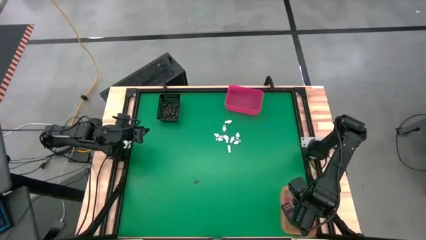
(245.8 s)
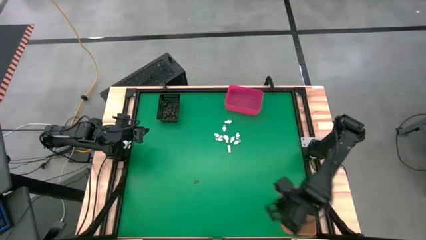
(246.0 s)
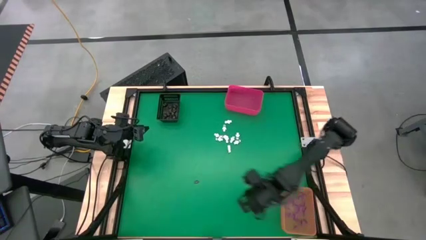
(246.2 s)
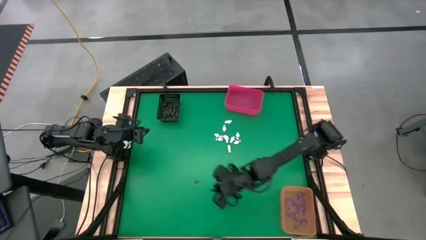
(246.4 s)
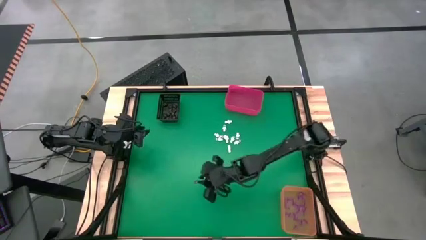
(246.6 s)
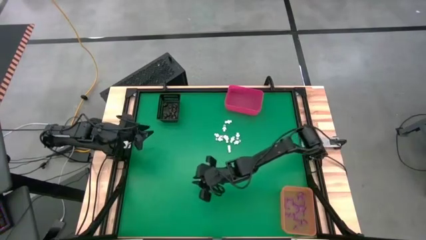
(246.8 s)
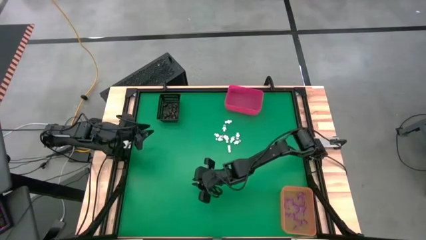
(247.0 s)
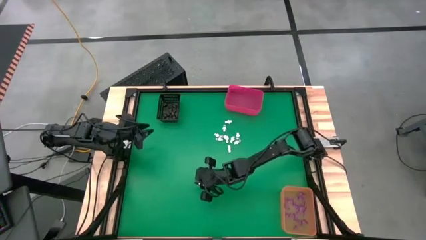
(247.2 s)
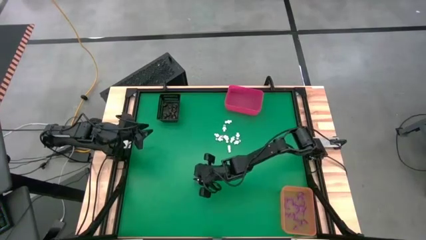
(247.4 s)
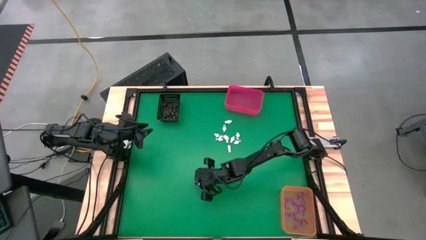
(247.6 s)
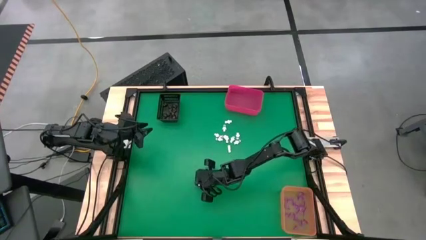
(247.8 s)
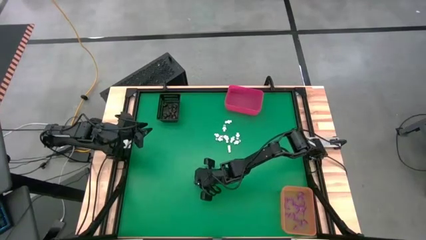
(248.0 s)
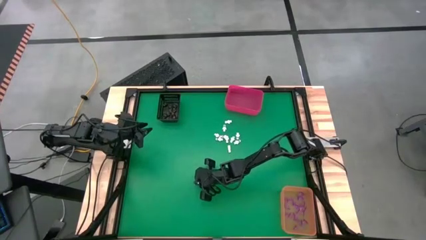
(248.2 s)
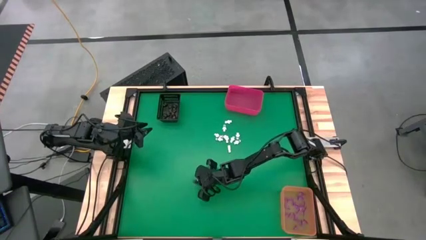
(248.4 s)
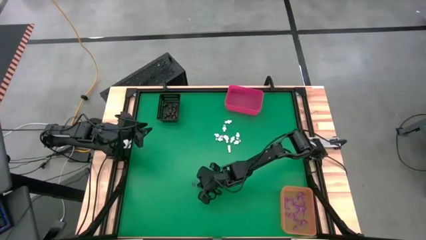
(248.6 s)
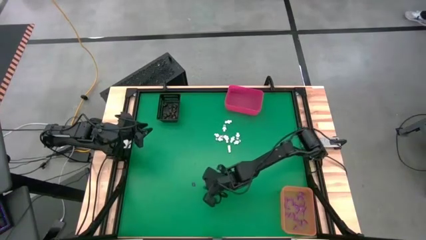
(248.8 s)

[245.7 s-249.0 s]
Task: Sort Halloween decoration
Put the pink witch hat toy into the orange bin

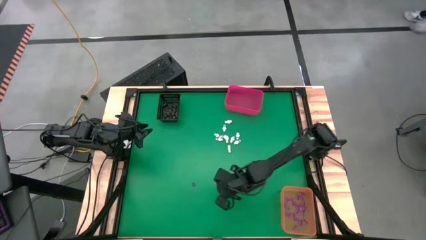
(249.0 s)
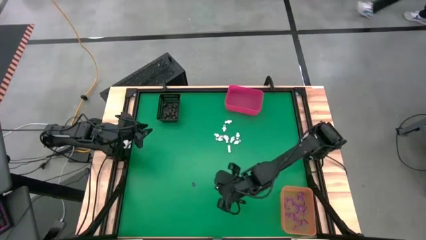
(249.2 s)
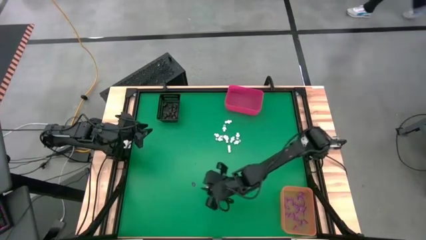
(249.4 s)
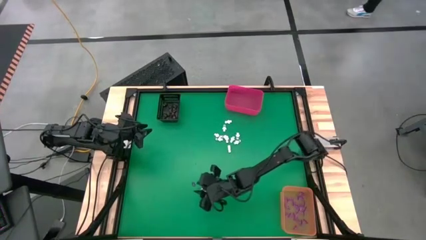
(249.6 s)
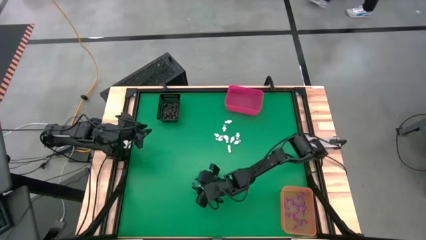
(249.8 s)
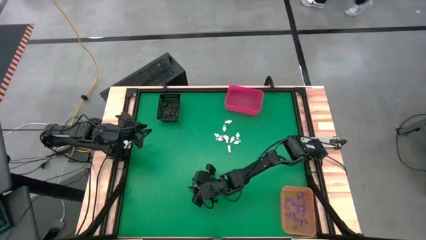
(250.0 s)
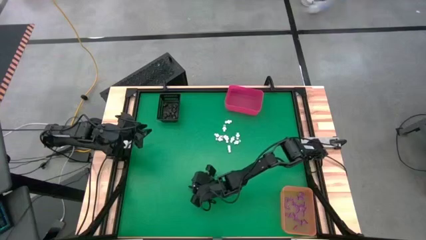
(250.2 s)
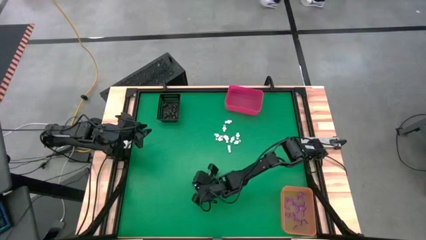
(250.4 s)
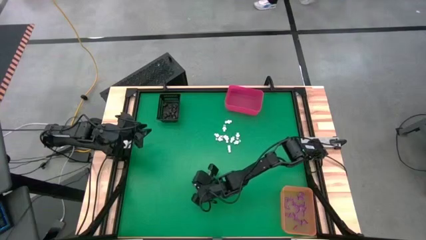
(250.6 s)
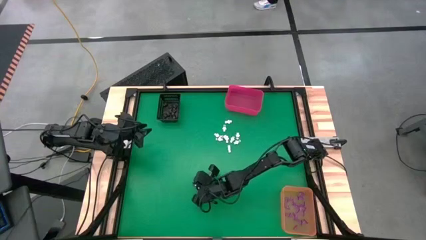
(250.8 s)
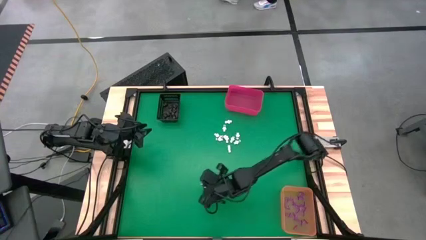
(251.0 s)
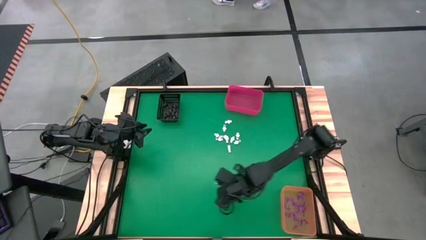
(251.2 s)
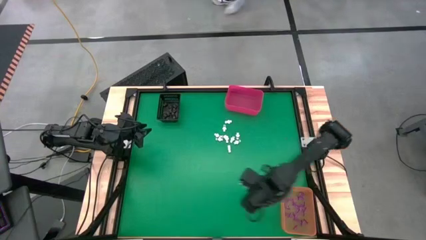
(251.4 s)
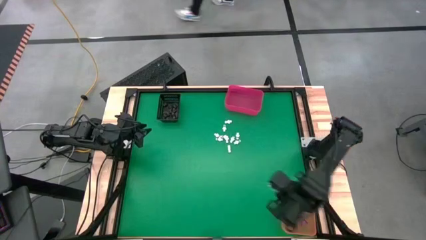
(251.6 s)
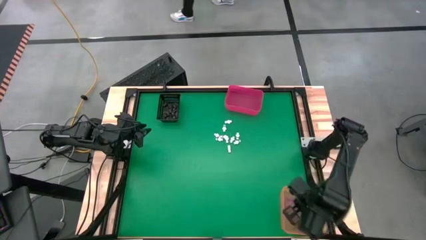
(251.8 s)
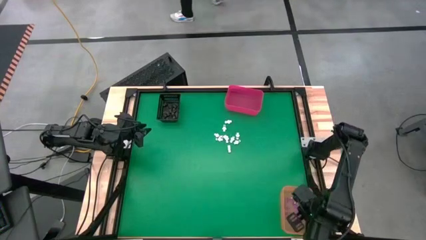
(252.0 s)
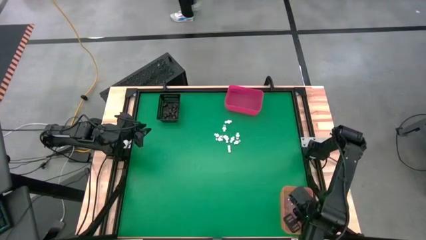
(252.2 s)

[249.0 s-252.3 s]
Put the pink witch hat toy into the orange bin

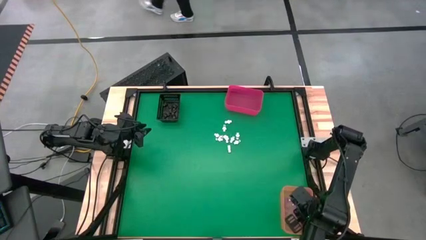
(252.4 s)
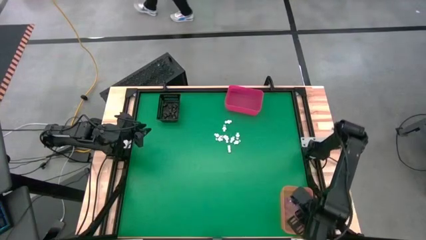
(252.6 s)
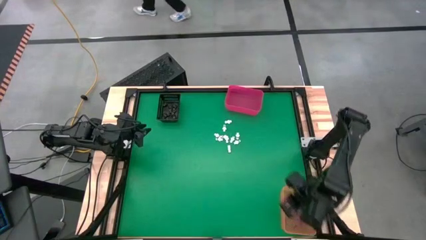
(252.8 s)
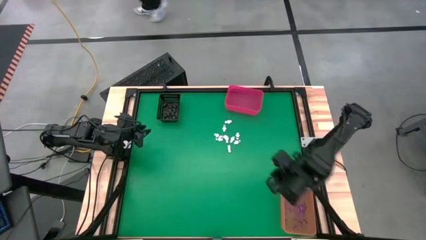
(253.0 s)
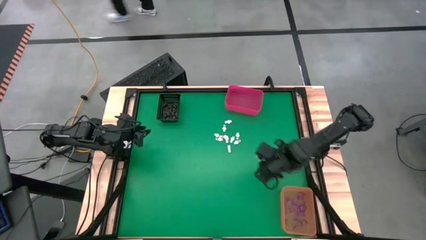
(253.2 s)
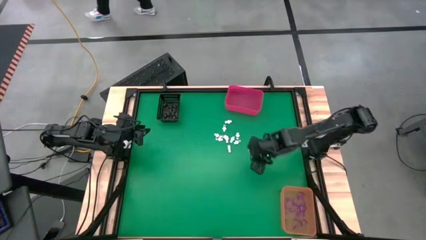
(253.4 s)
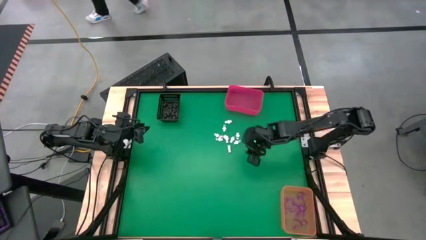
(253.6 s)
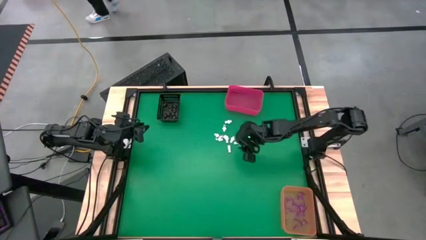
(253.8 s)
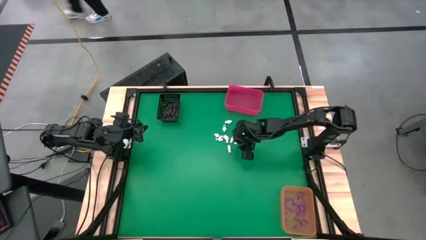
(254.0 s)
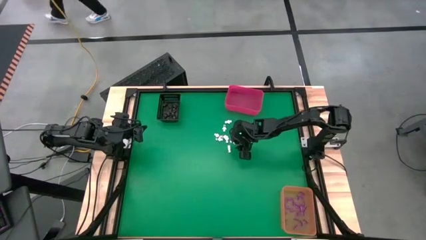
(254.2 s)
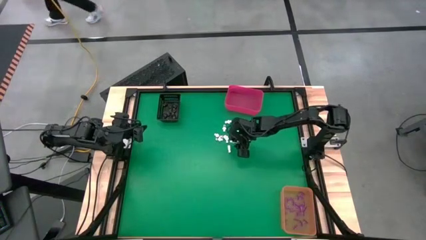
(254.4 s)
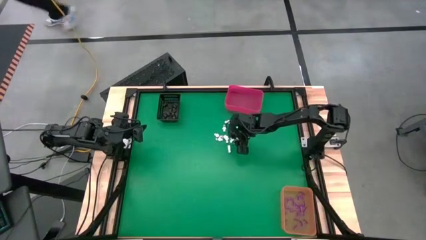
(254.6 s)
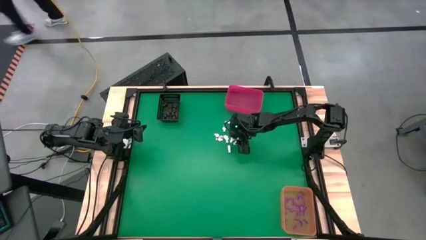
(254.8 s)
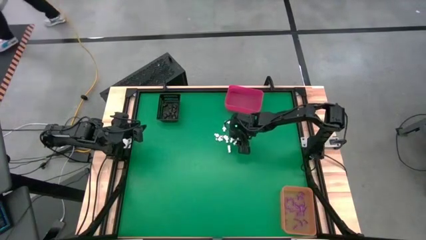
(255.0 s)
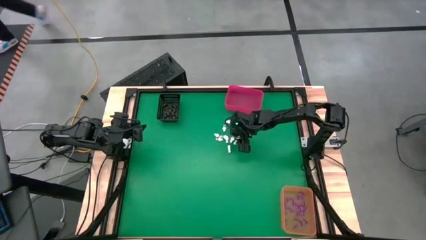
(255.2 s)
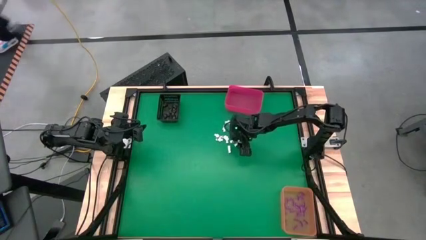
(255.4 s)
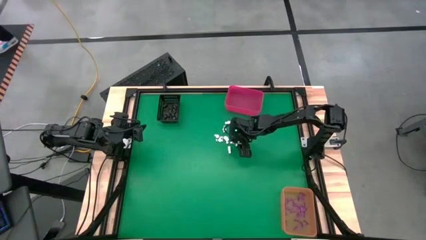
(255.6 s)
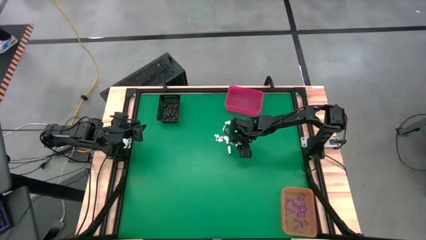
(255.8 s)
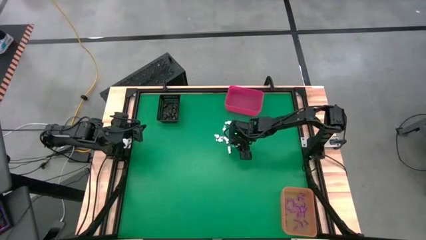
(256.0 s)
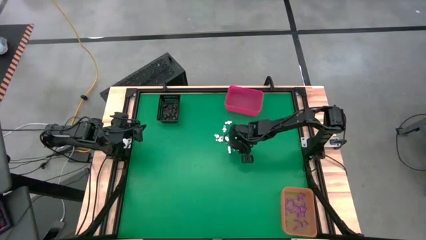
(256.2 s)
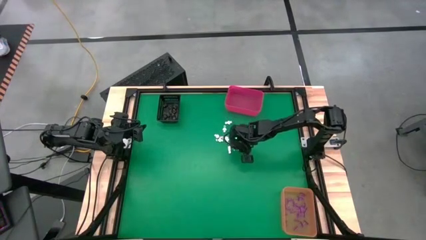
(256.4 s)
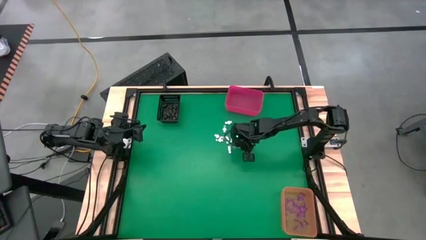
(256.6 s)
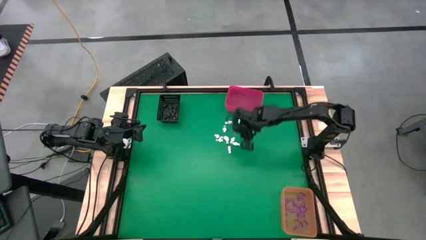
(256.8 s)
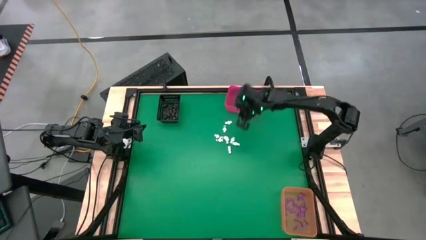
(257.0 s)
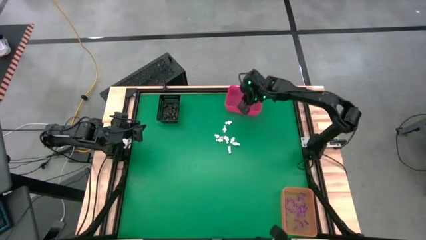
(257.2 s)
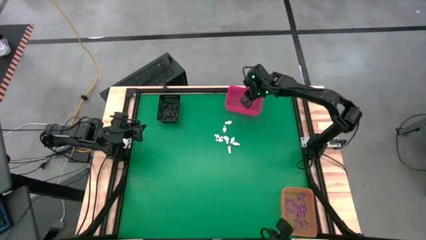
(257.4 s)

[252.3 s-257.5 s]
Put the white skeleton toy into the pink bin

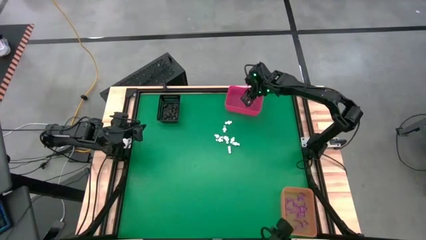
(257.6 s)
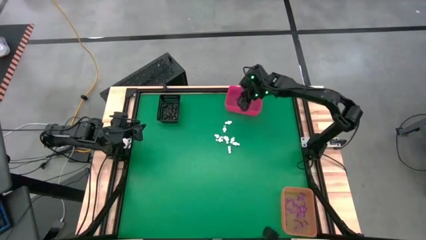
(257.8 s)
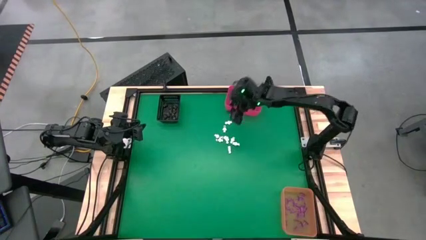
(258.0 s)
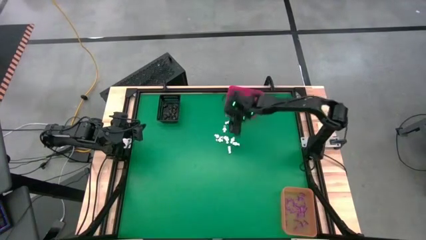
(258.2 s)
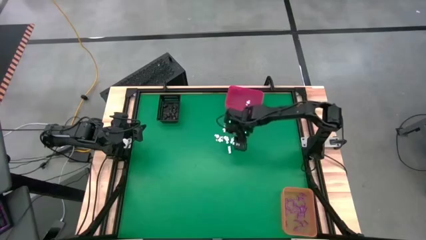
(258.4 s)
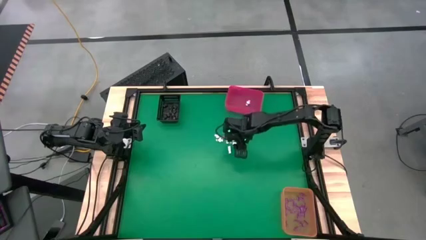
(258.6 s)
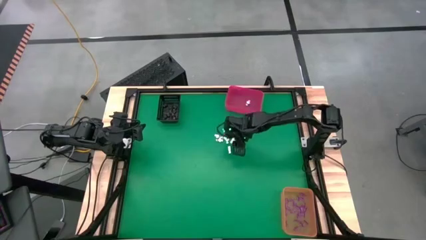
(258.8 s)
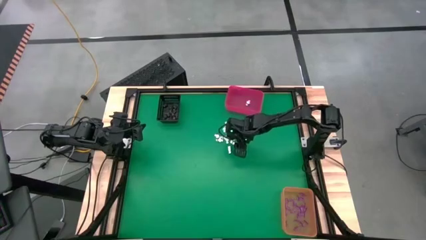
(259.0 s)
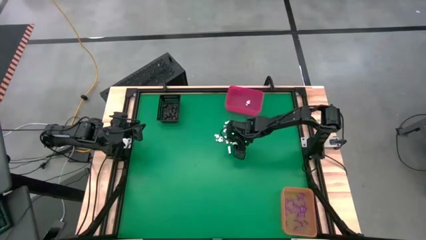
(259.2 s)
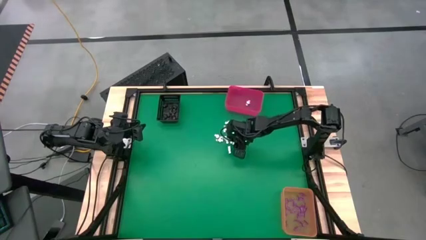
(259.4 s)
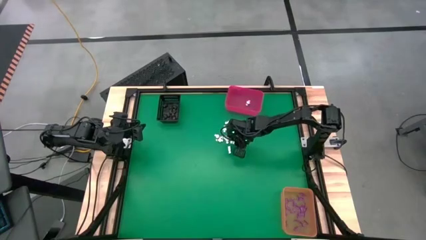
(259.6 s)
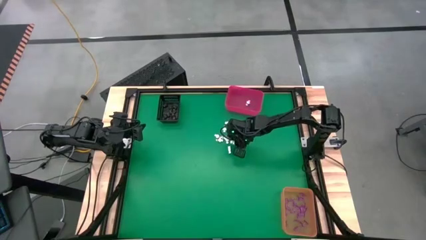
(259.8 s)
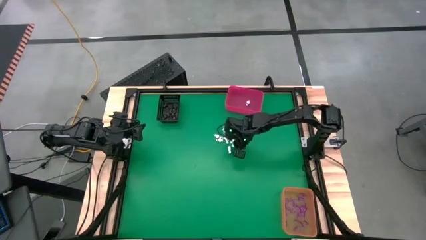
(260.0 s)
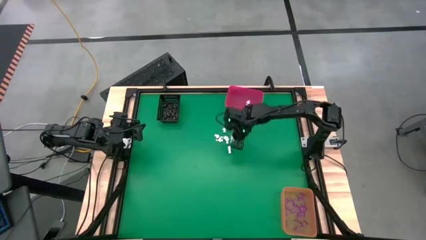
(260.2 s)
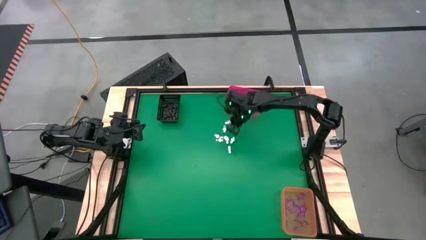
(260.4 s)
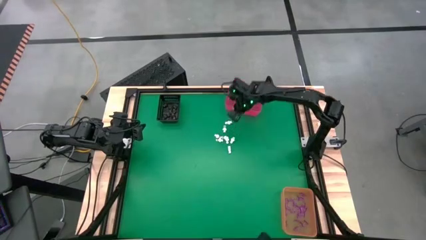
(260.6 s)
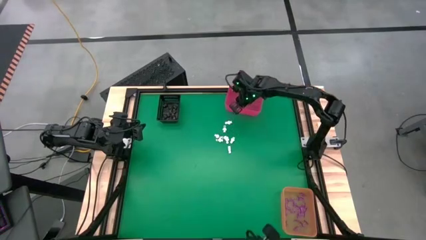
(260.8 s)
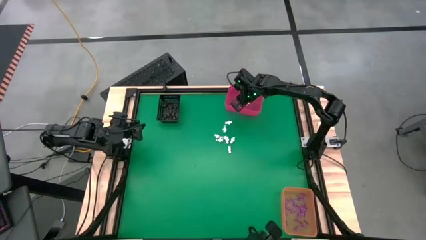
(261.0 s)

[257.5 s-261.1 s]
Put the white skeleton toy into the pink bin
